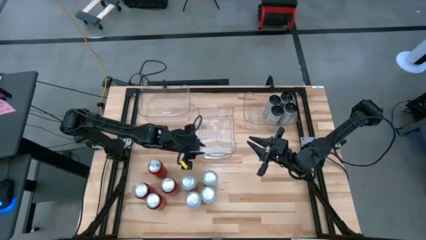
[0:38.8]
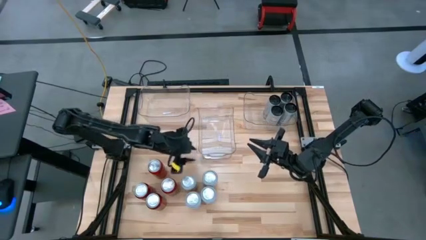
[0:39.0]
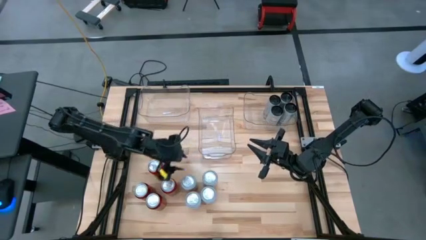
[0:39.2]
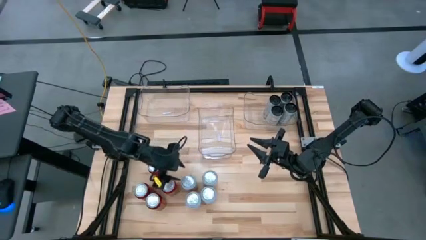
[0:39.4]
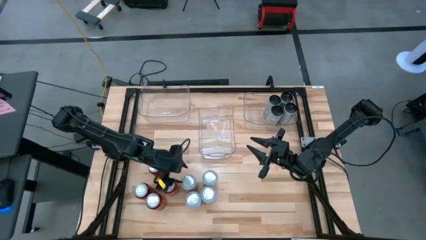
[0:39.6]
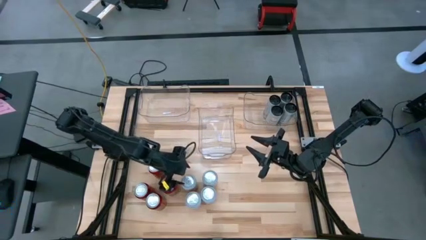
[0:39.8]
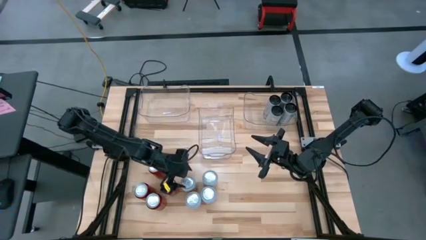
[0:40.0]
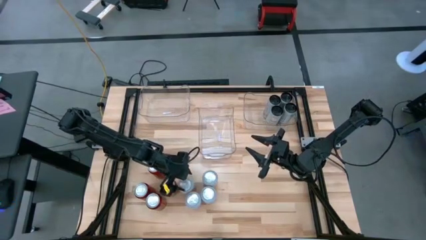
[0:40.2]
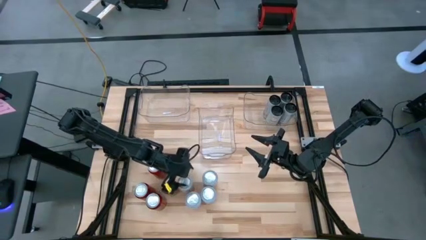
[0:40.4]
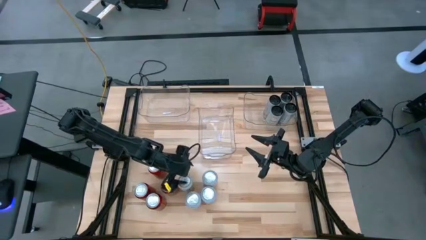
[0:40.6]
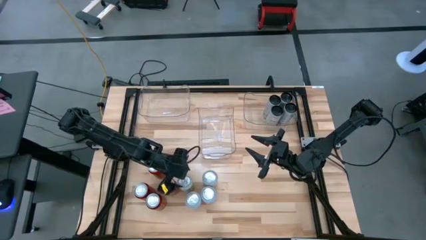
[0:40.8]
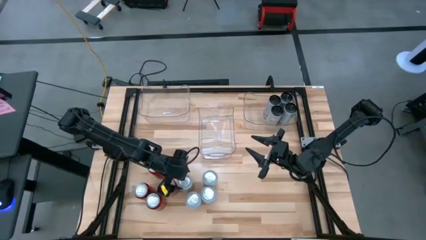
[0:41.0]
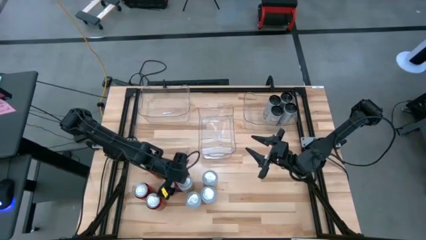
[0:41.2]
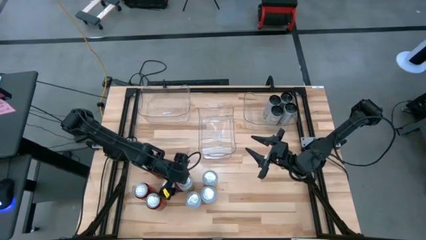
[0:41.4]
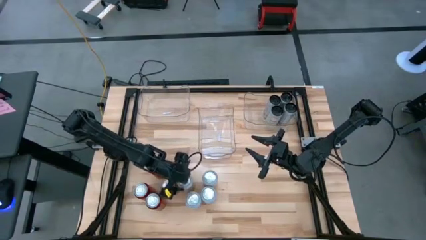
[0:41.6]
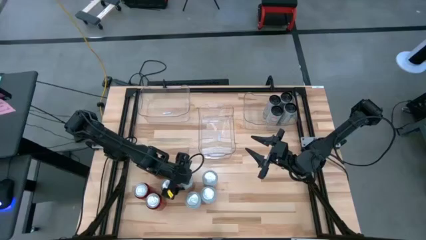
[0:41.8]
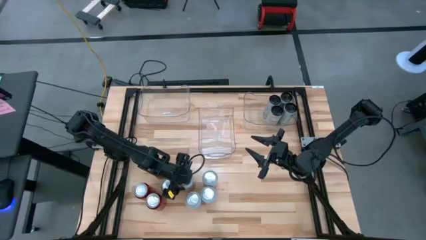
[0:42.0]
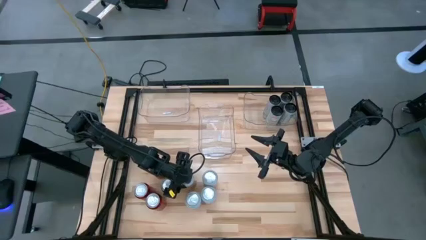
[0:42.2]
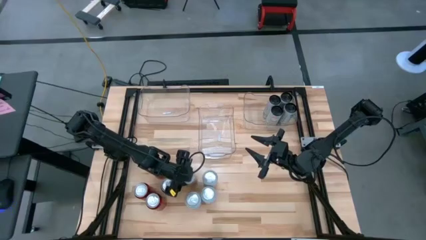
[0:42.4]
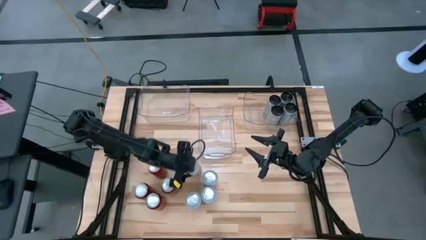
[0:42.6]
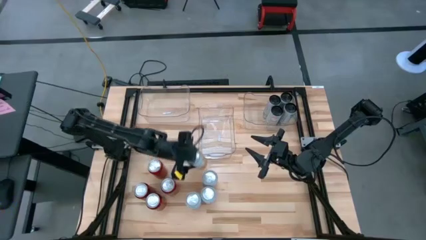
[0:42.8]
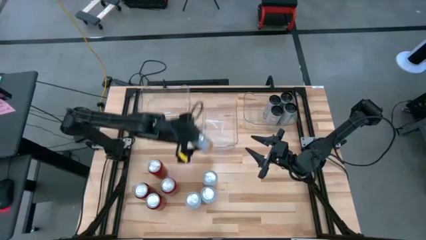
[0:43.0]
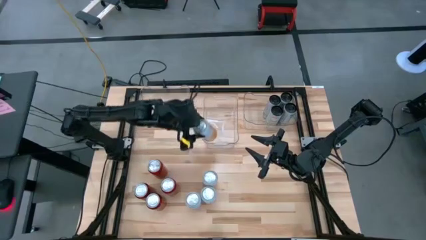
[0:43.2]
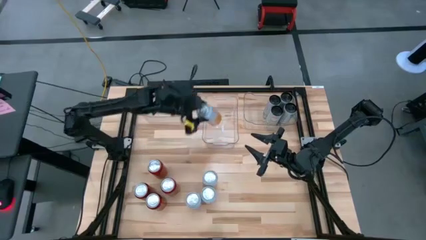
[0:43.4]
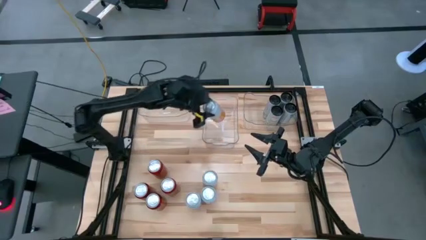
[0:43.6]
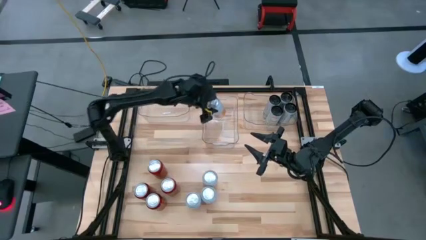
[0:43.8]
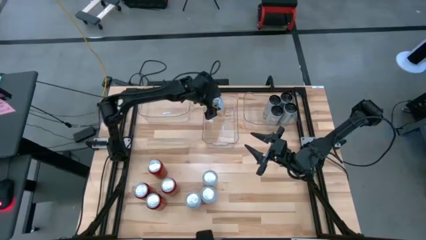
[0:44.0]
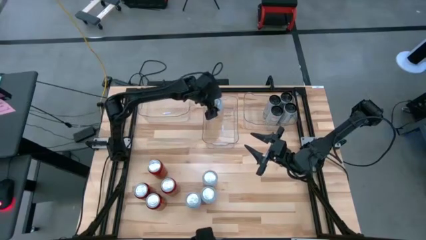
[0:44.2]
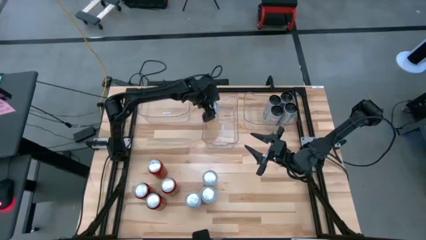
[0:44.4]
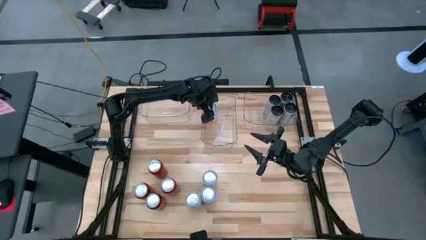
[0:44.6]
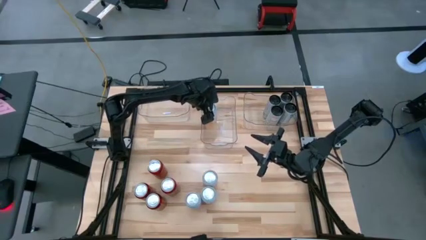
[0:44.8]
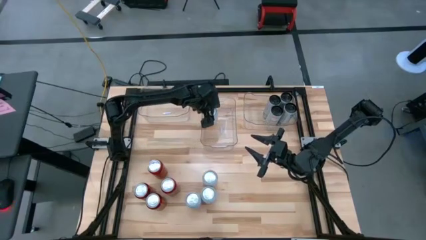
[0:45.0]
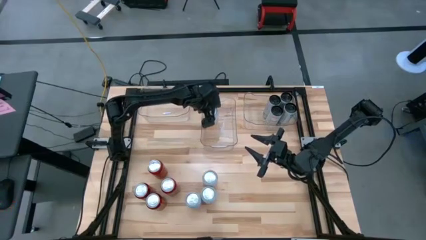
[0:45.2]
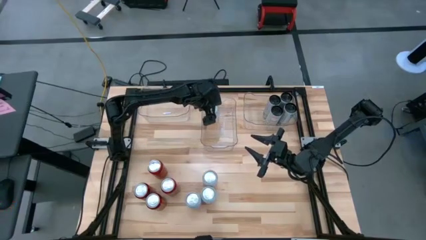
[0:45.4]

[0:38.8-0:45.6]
Task: Sort soda cans
Put the left yellow and white soda can in the middle transparent bin

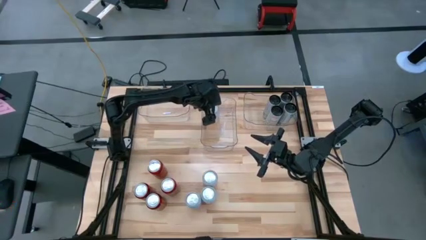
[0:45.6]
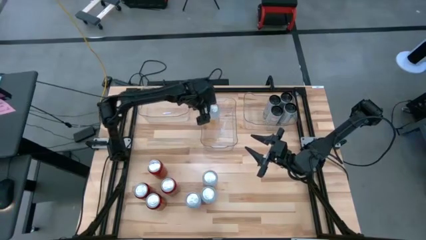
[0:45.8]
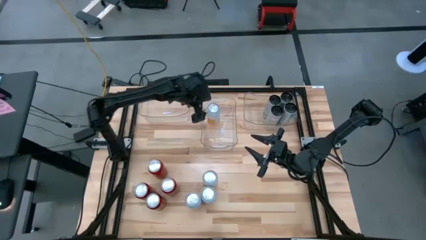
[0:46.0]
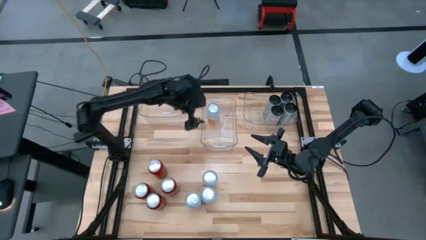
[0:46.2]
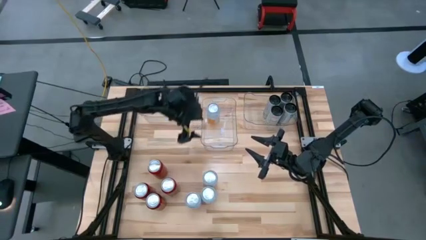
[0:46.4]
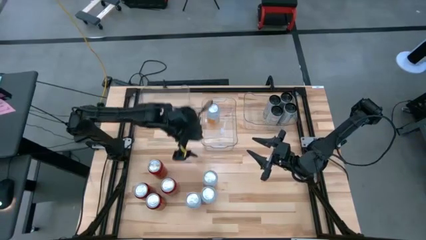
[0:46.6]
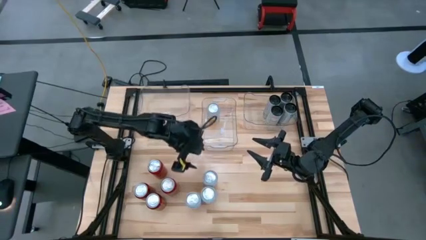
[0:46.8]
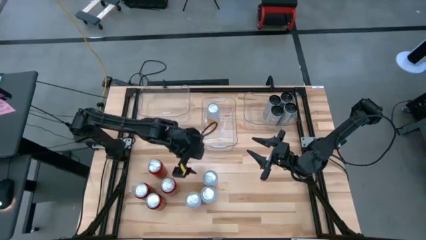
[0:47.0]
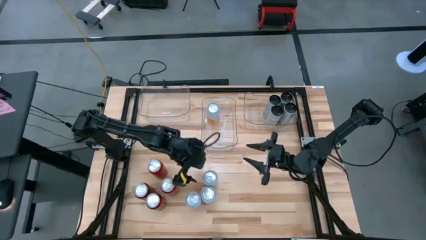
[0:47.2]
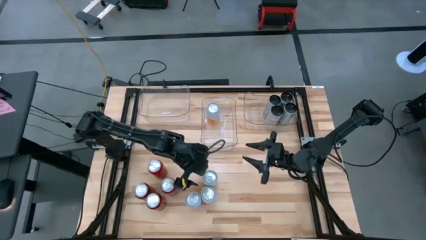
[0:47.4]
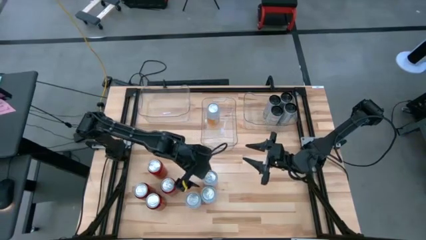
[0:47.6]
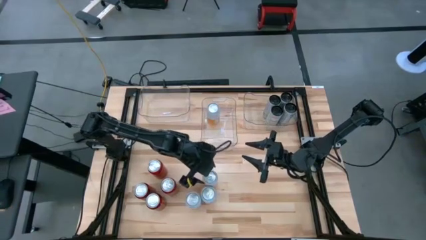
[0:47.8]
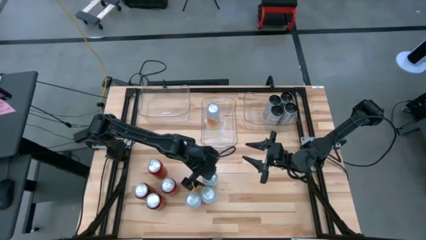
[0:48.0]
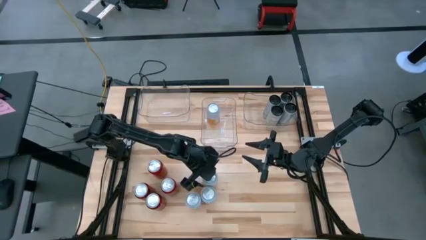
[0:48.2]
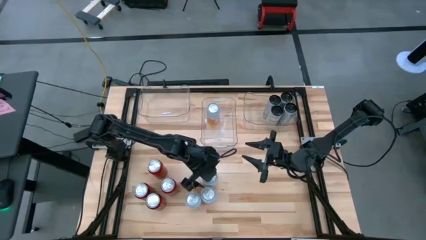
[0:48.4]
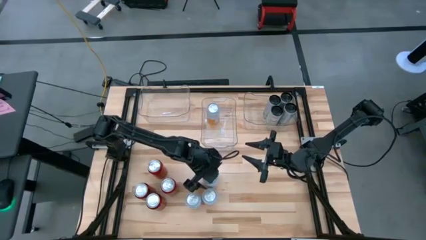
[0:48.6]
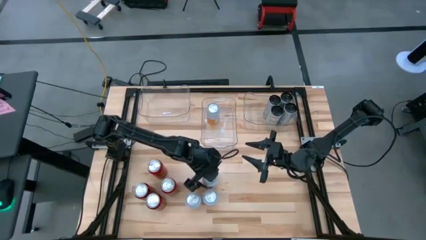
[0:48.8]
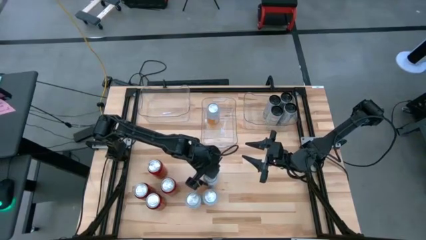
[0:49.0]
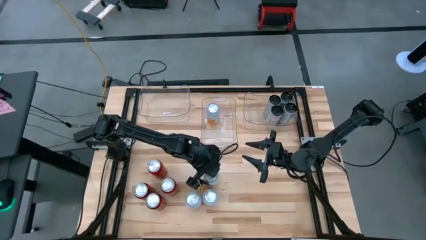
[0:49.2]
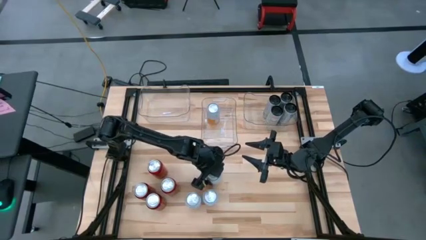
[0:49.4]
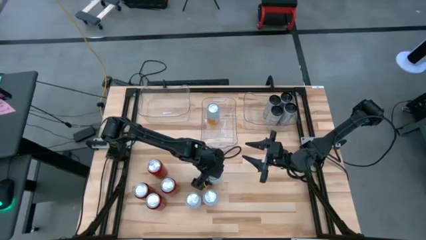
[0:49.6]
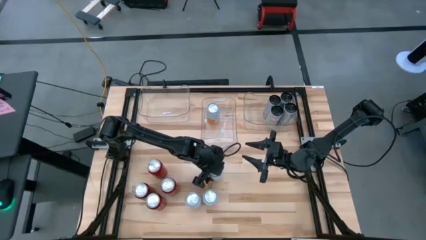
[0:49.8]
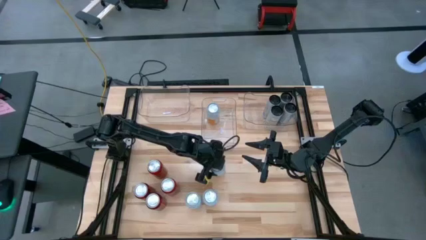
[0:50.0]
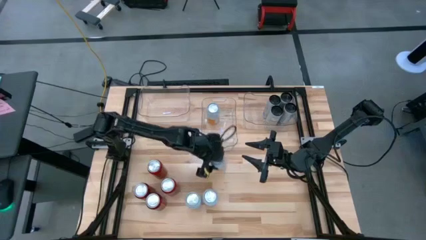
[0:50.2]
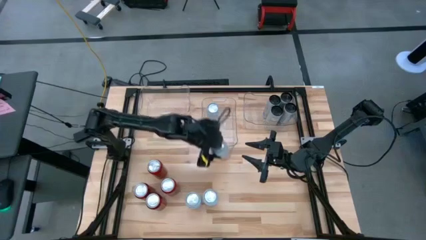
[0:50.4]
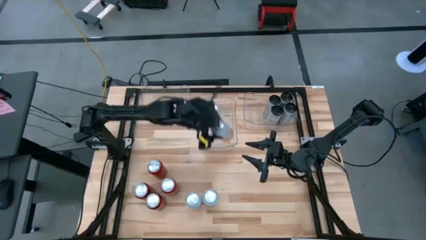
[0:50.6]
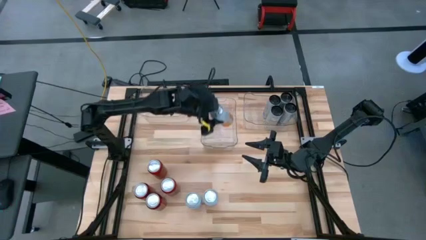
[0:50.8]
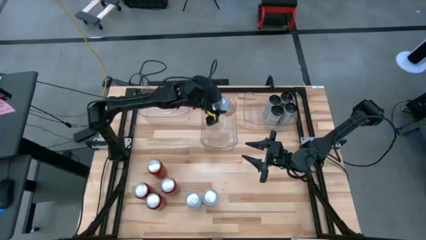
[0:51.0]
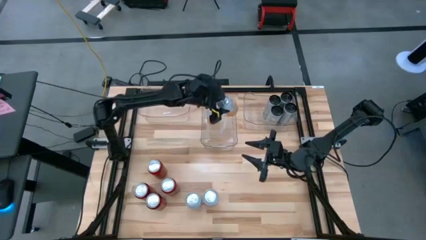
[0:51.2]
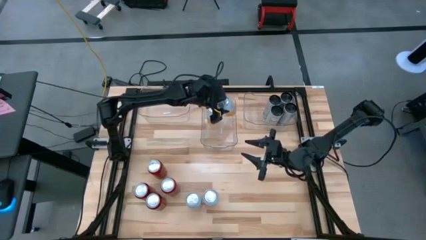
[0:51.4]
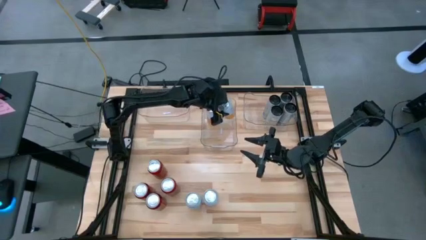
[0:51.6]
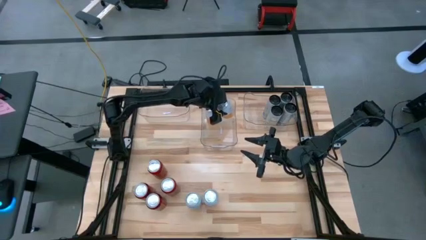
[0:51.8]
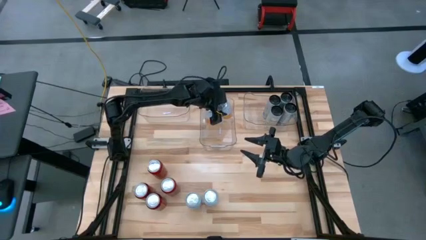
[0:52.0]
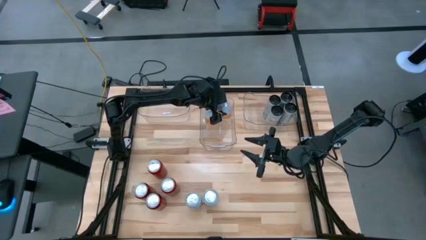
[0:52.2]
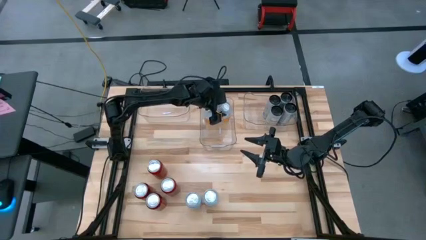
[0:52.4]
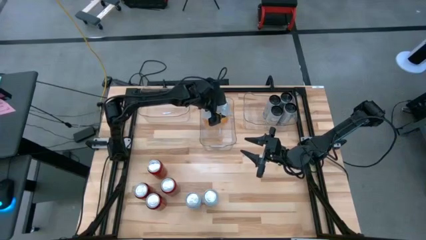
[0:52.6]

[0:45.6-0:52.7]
Put the yellow and white soda can in the middle transparent bin
